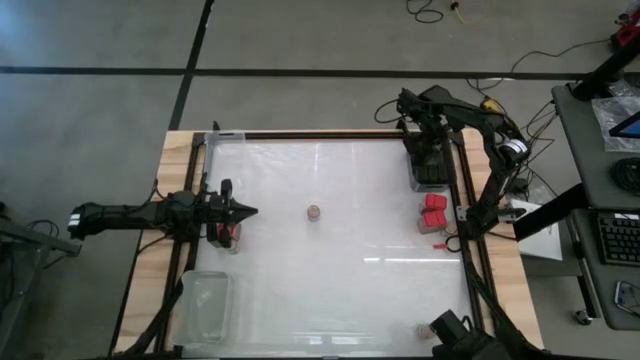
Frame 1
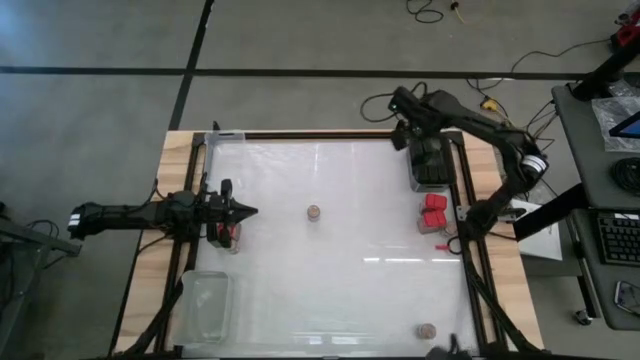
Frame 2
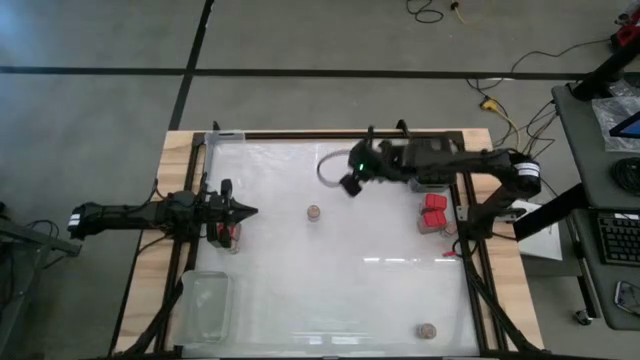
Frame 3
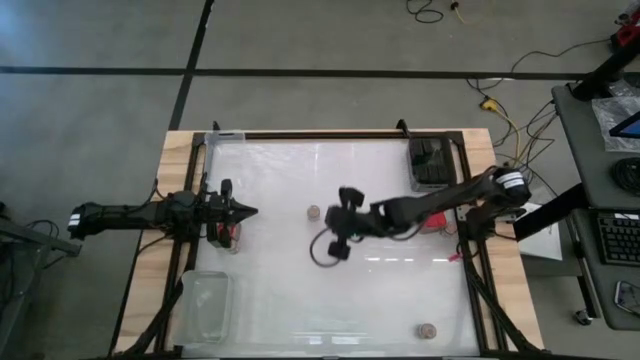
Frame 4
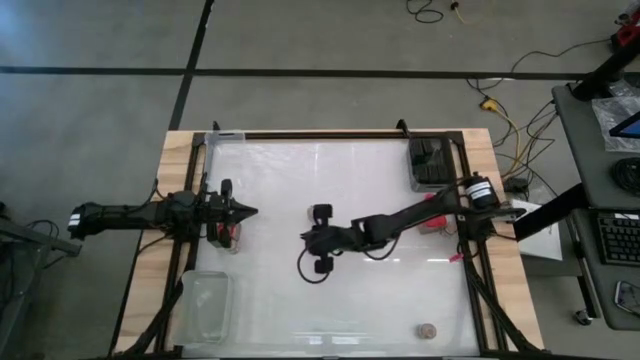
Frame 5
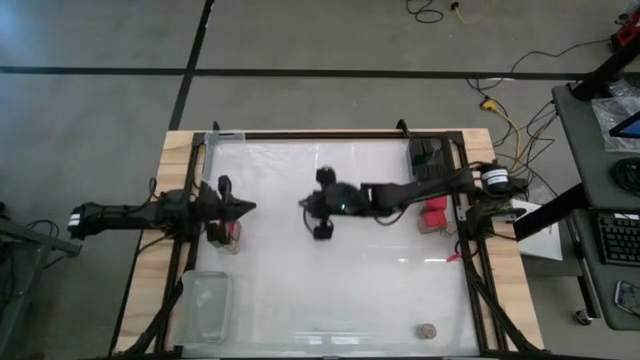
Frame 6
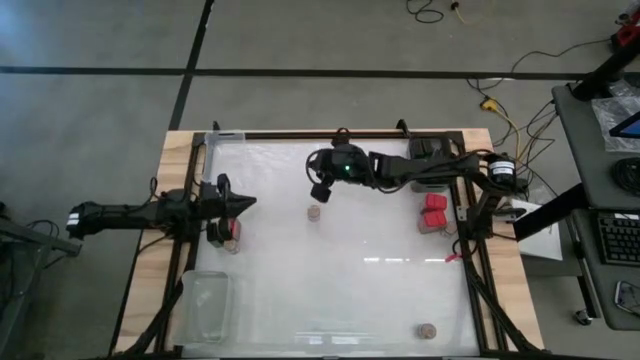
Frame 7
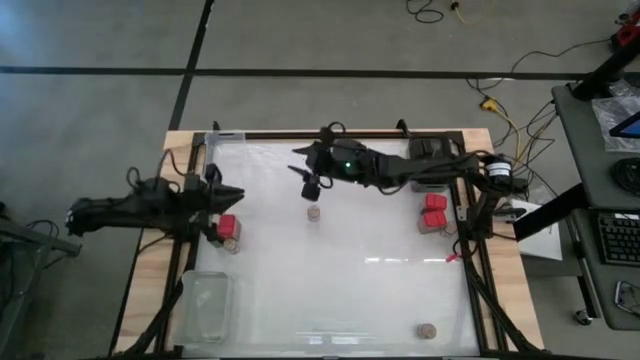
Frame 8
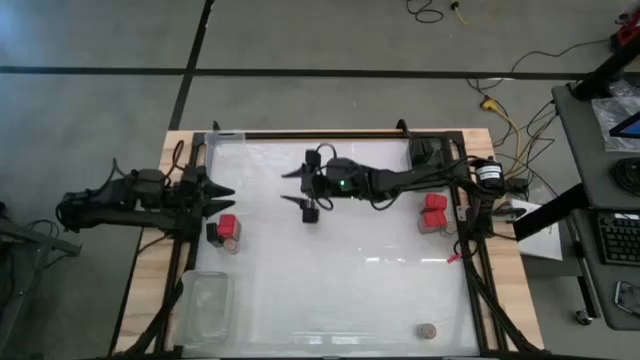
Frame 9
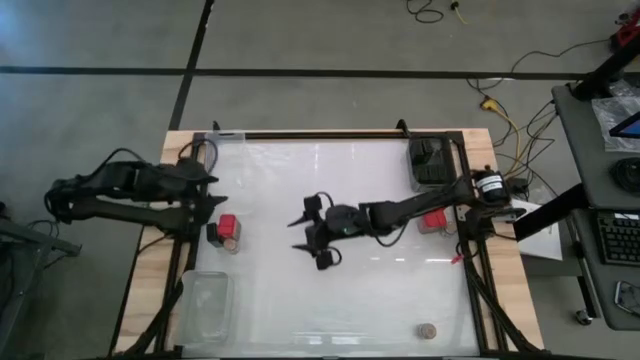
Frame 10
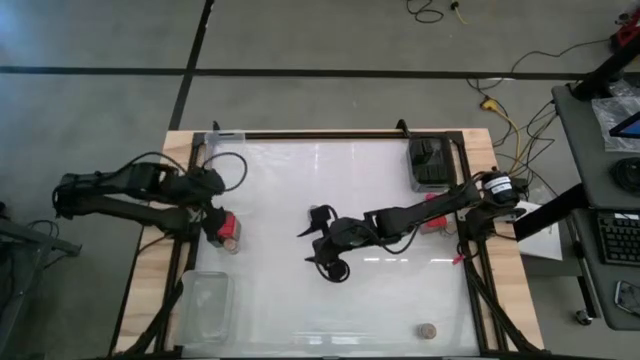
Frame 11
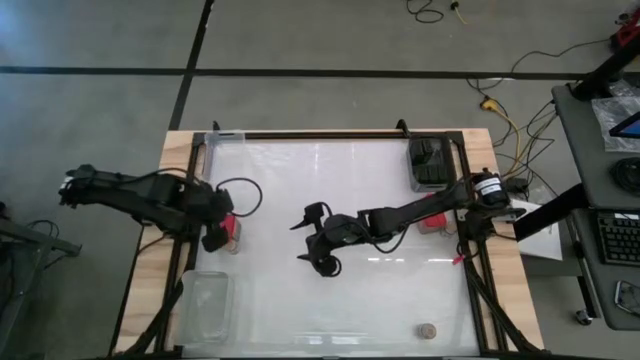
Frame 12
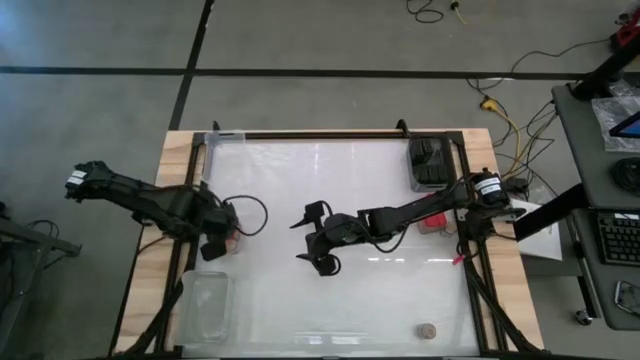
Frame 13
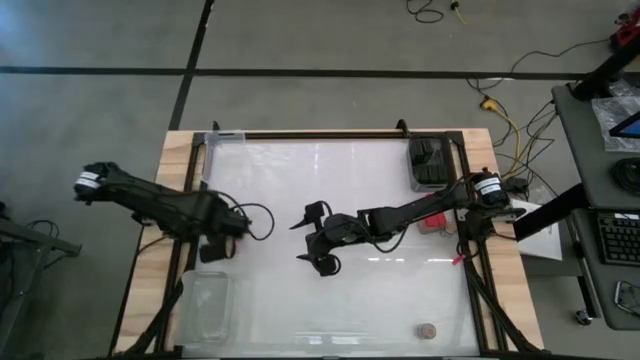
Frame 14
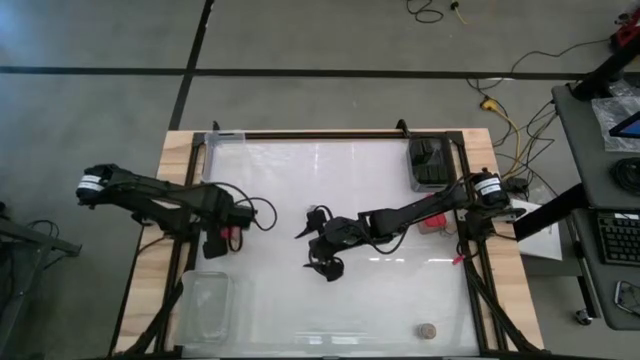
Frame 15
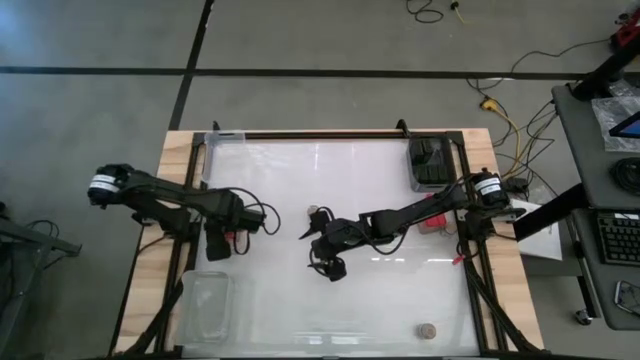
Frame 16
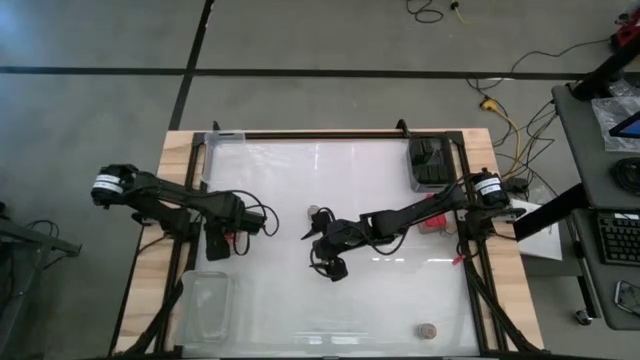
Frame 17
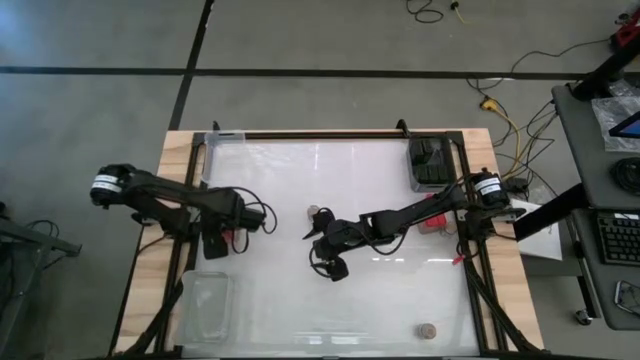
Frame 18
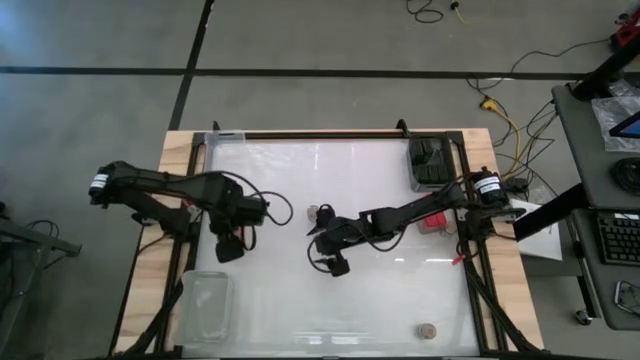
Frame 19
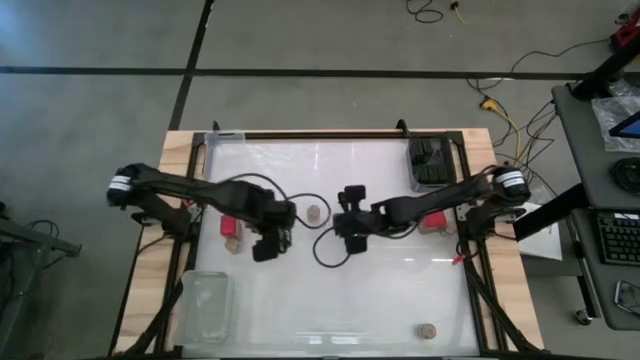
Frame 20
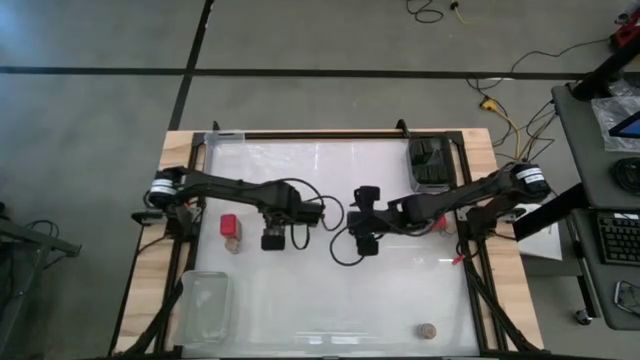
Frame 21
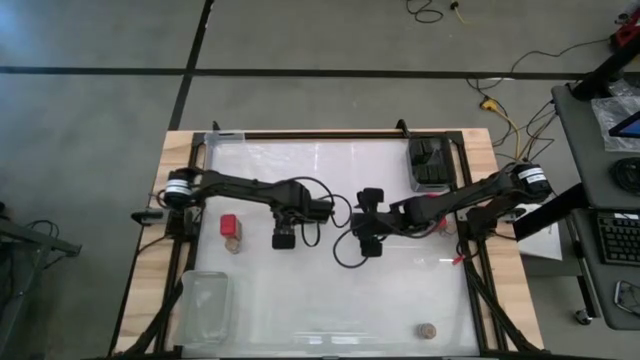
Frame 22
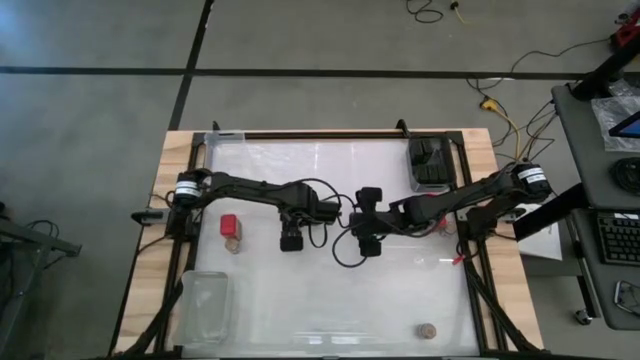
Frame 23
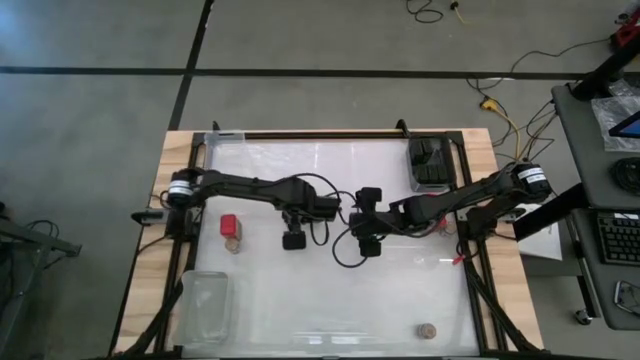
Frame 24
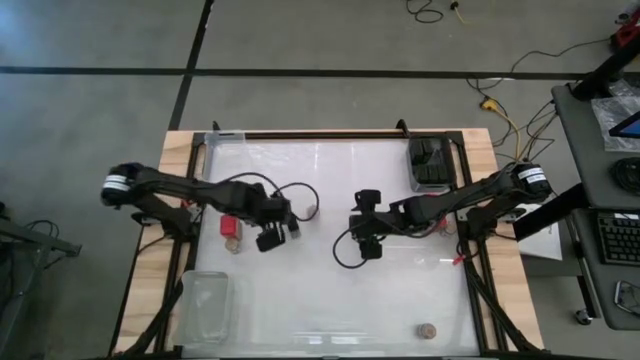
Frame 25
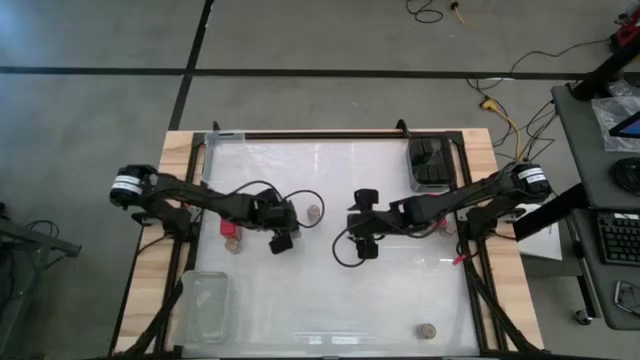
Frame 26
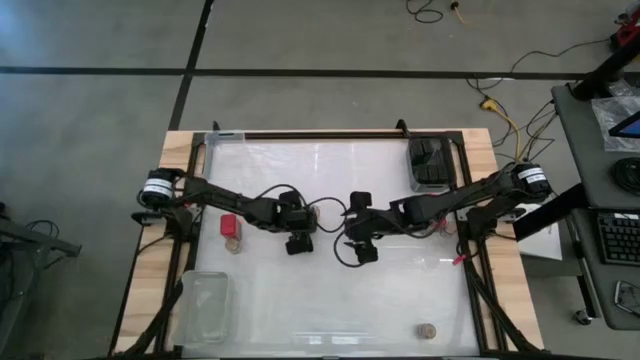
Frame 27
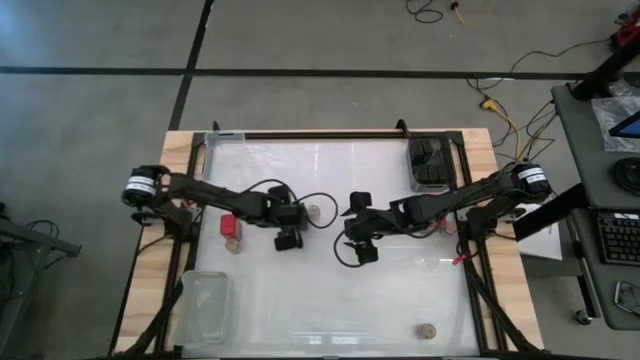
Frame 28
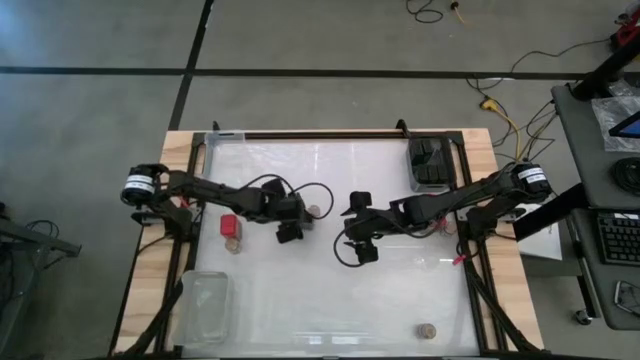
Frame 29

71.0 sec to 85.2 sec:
Task: Sort spices by type
Put the black seasoning can into the black bin

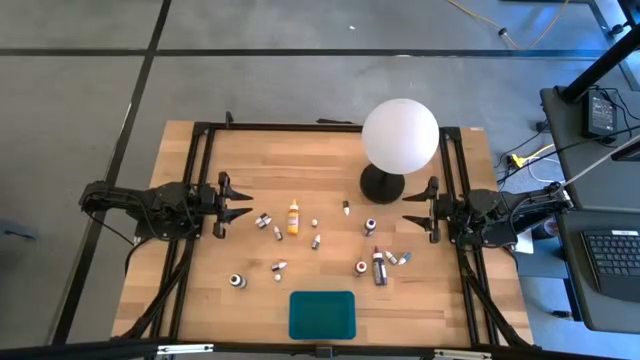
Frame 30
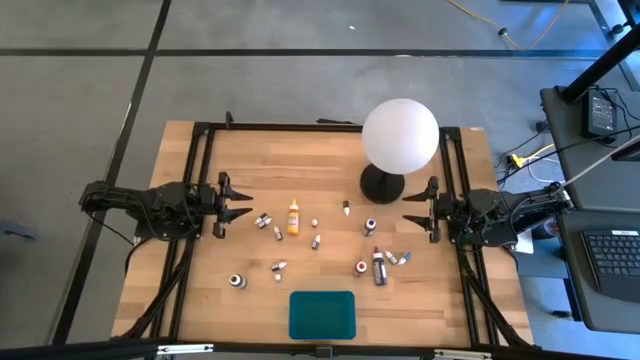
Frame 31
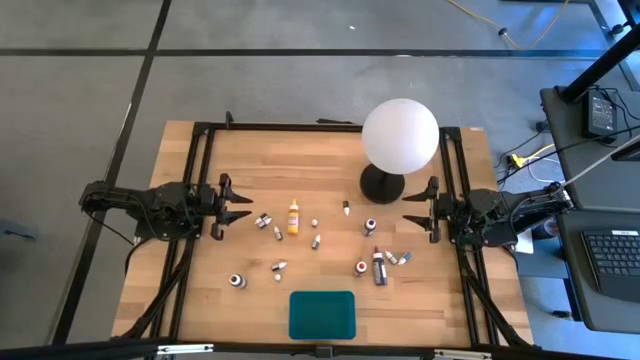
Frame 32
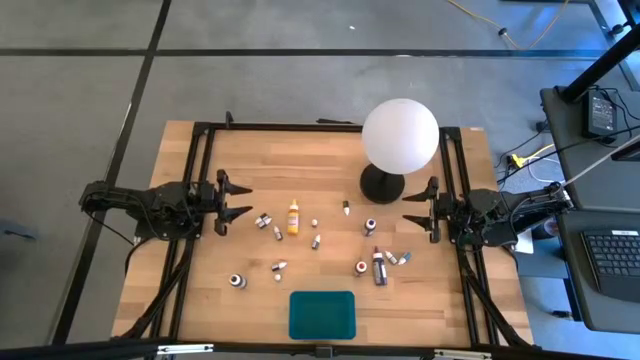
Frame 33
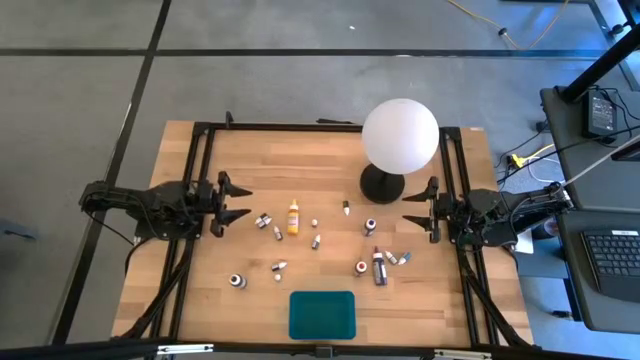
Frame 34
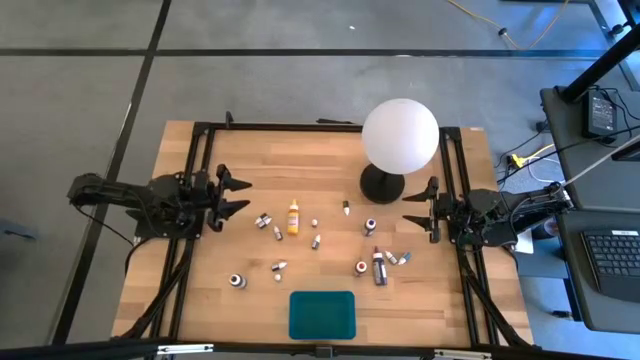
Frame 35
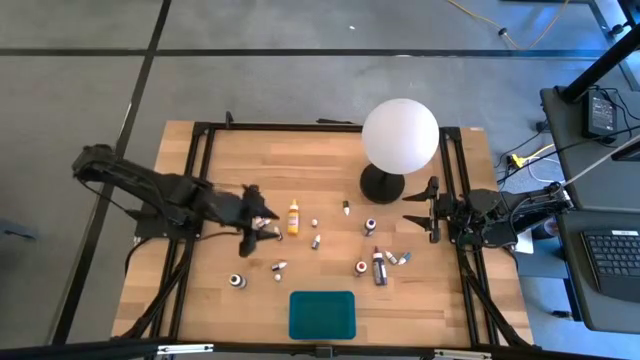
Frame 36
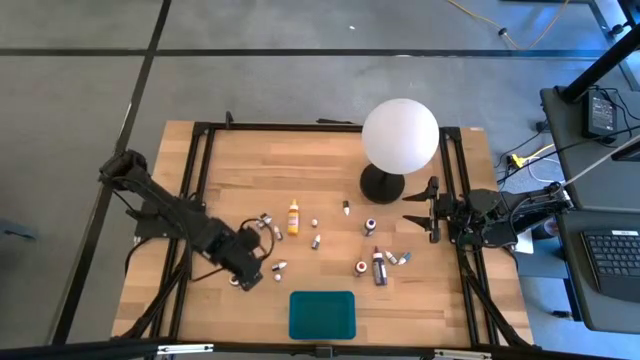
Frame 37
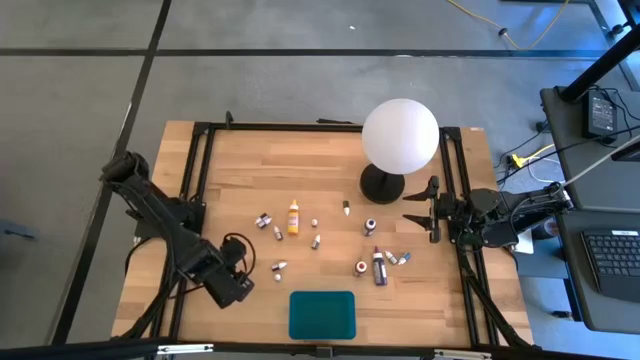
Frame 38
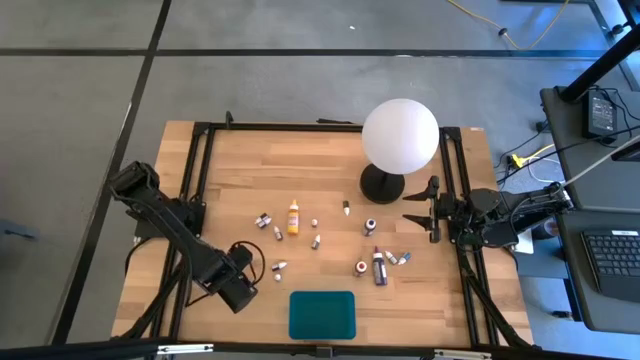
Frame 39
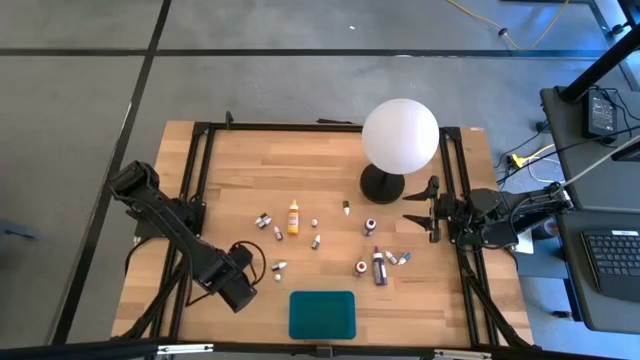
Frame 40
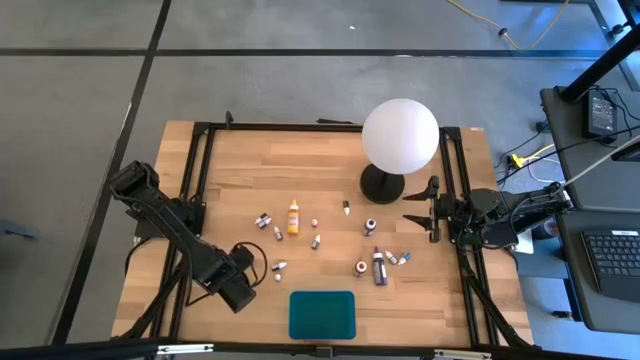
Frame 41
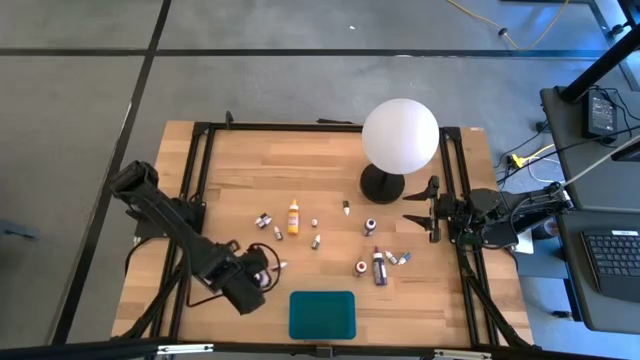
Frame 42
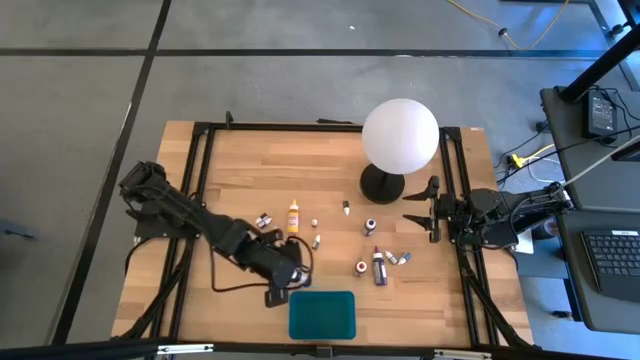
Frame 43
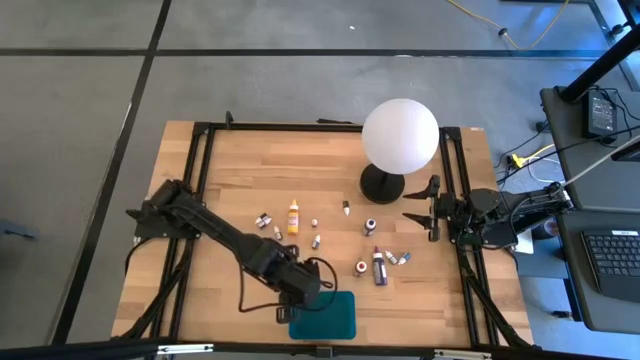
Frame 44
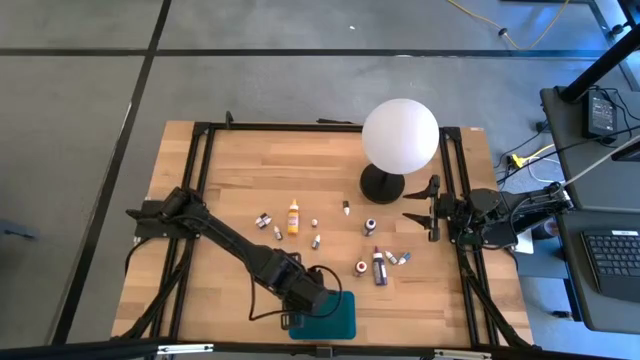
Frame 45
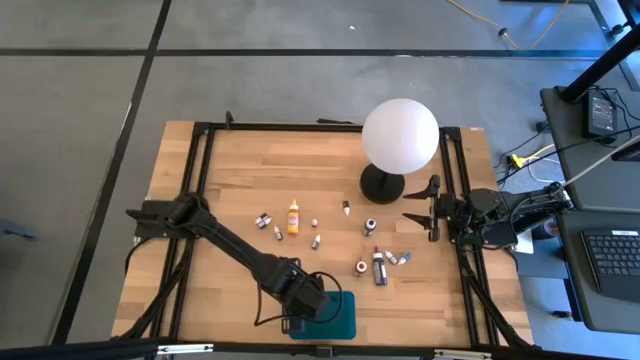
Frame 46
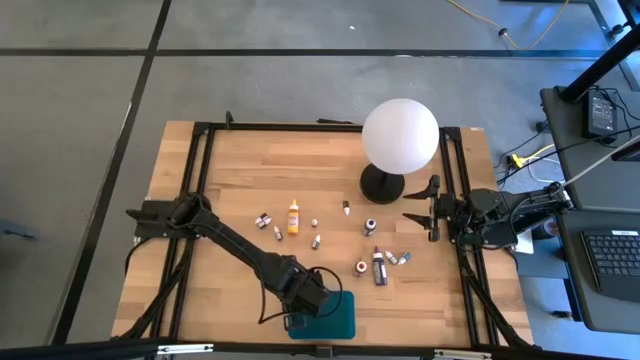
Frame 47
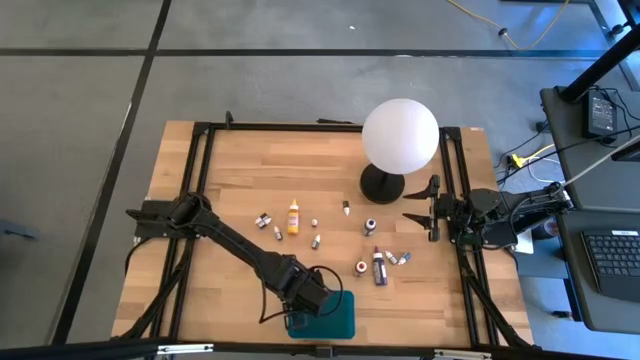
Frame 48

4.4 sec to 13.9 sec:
Task: Pick & Place food coloring
Put the large black food coloring bottle into the blue bin
